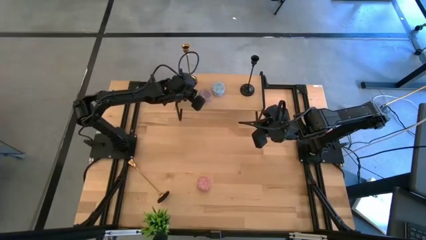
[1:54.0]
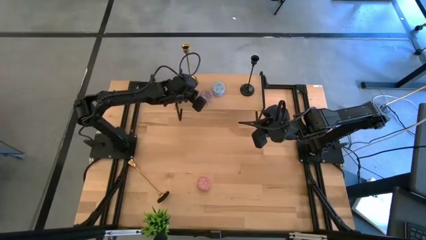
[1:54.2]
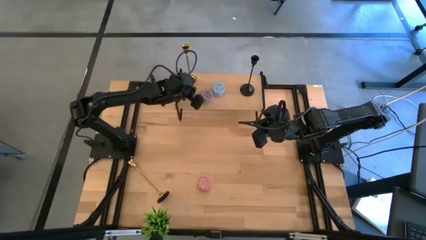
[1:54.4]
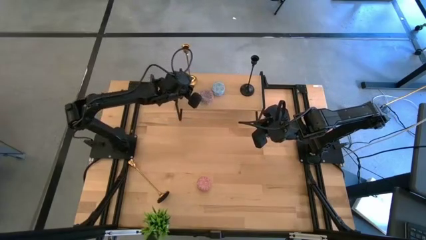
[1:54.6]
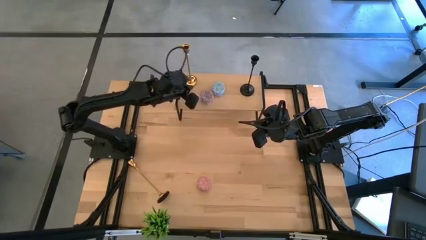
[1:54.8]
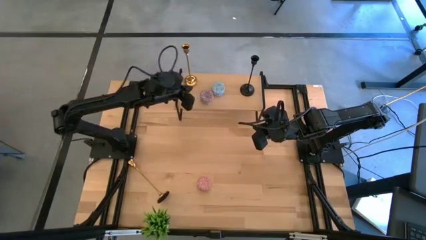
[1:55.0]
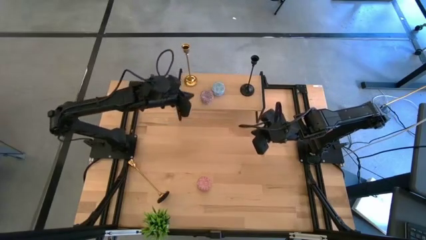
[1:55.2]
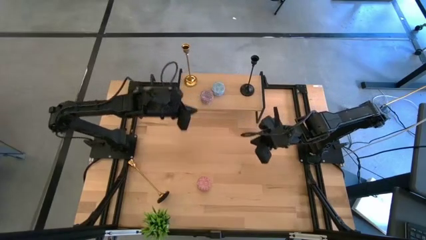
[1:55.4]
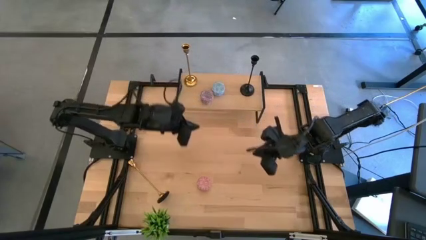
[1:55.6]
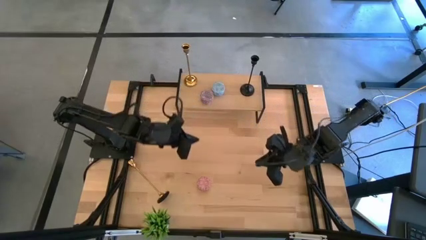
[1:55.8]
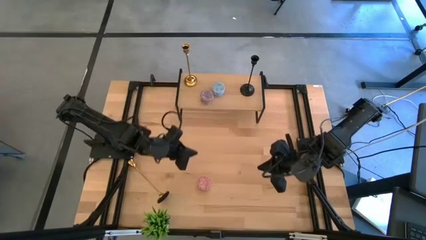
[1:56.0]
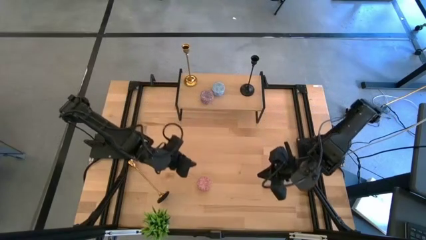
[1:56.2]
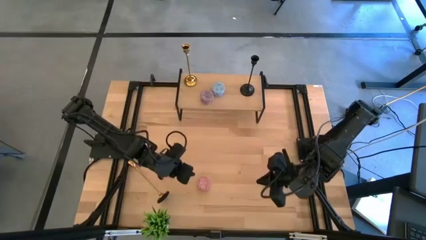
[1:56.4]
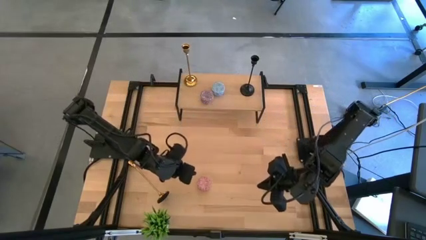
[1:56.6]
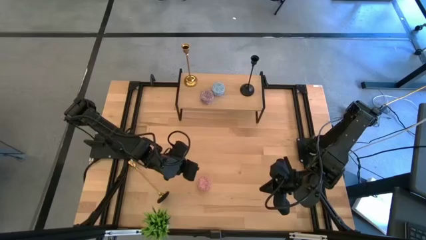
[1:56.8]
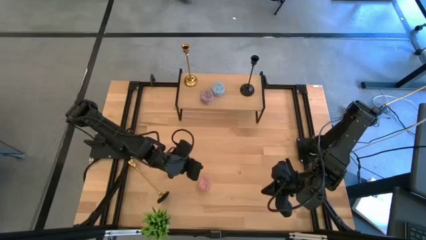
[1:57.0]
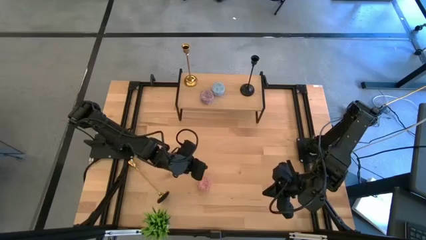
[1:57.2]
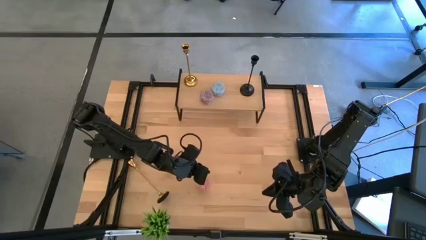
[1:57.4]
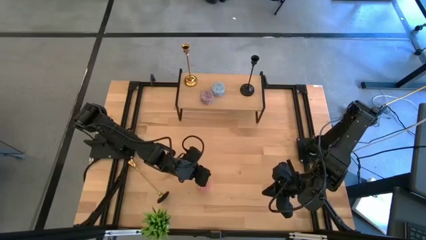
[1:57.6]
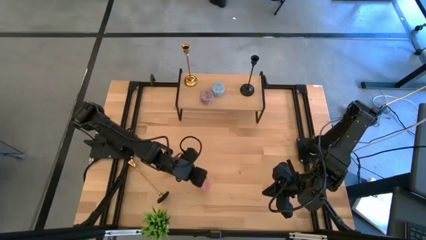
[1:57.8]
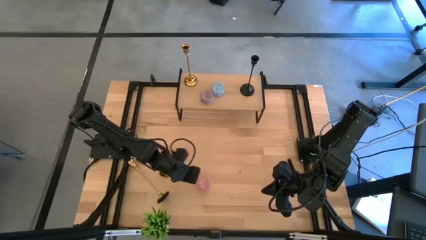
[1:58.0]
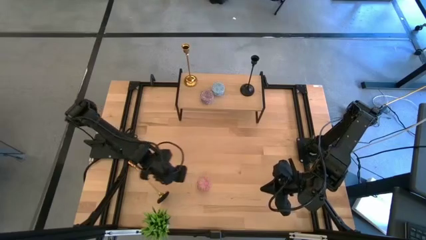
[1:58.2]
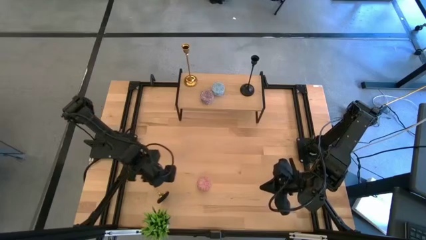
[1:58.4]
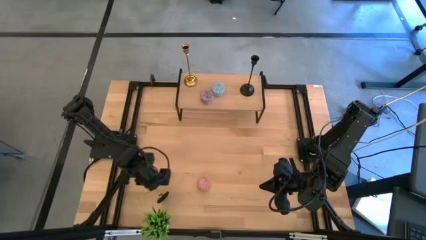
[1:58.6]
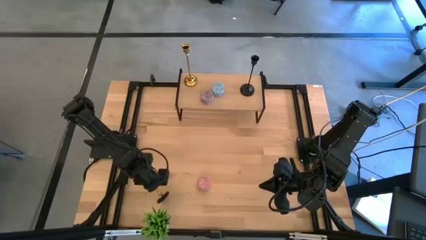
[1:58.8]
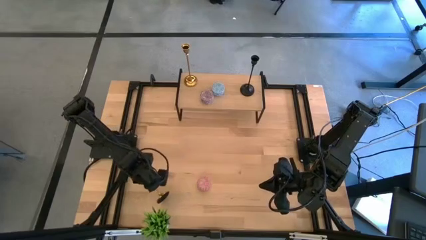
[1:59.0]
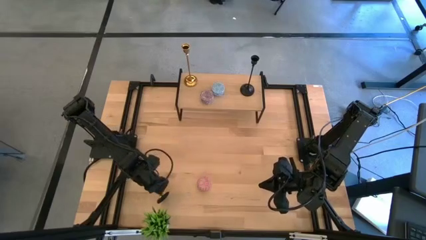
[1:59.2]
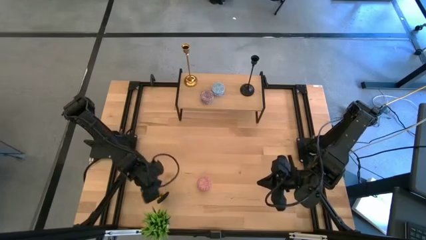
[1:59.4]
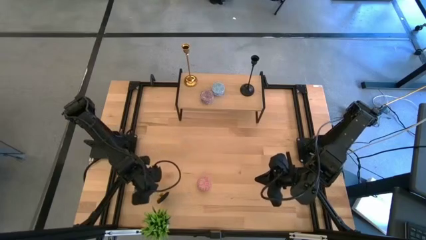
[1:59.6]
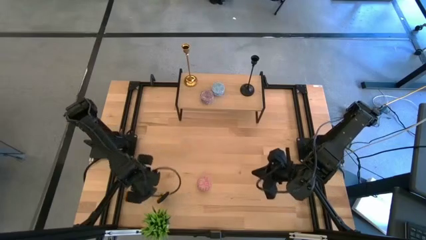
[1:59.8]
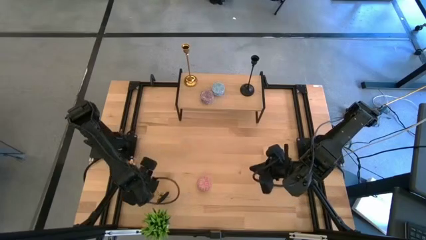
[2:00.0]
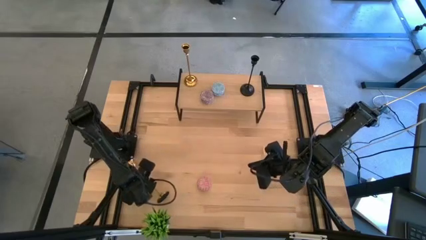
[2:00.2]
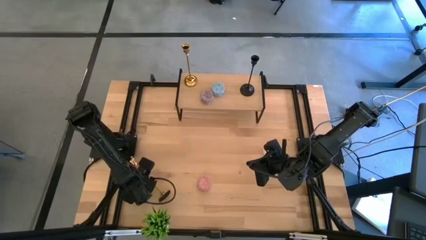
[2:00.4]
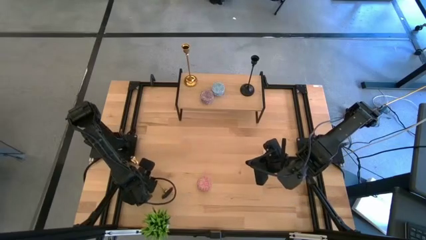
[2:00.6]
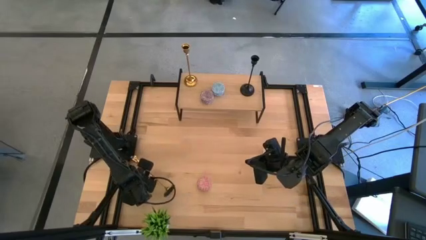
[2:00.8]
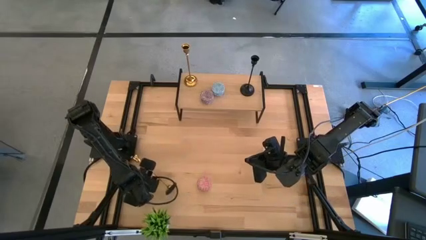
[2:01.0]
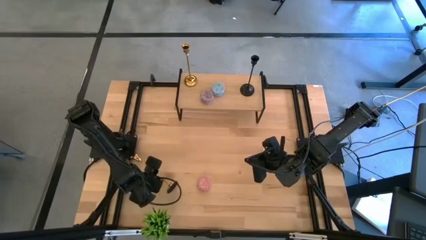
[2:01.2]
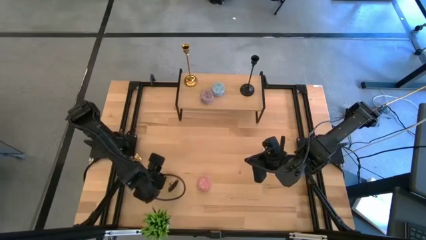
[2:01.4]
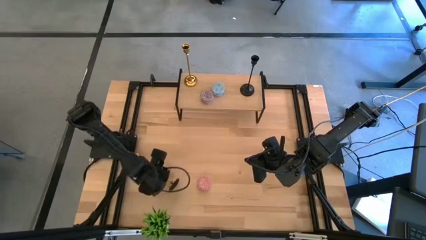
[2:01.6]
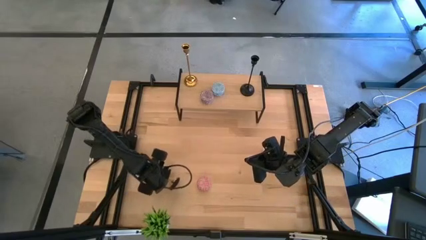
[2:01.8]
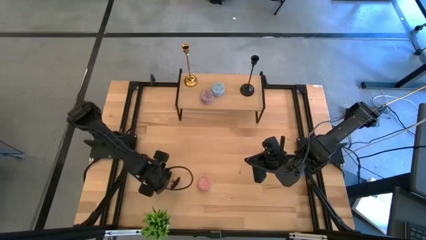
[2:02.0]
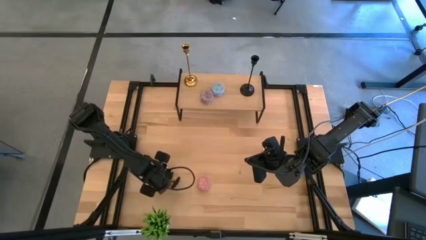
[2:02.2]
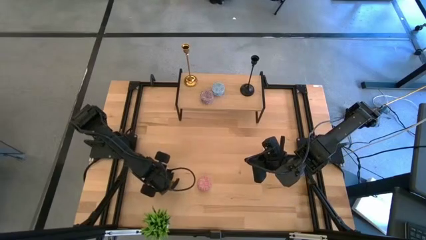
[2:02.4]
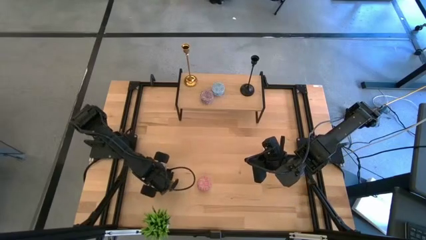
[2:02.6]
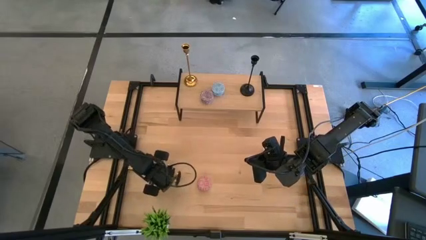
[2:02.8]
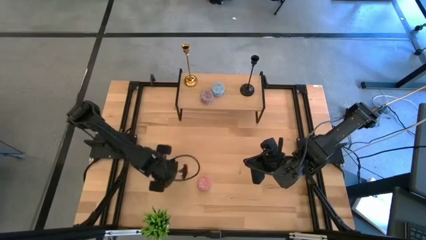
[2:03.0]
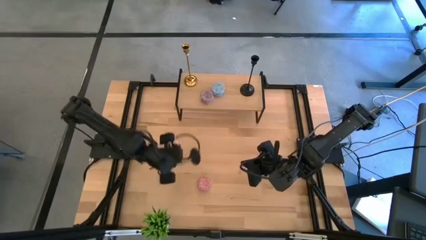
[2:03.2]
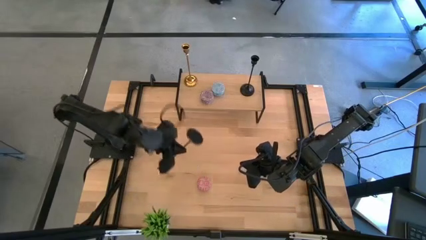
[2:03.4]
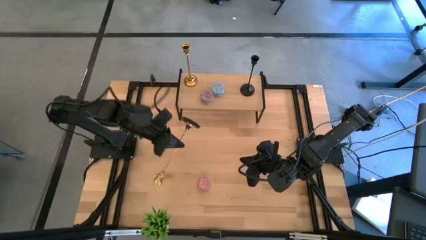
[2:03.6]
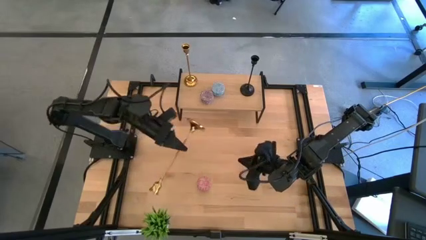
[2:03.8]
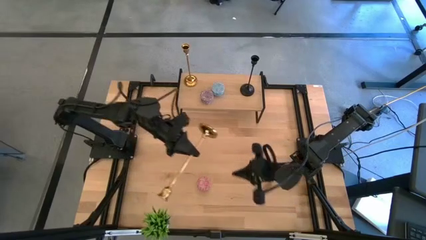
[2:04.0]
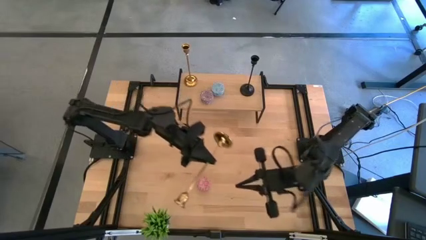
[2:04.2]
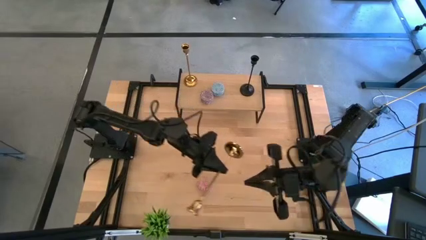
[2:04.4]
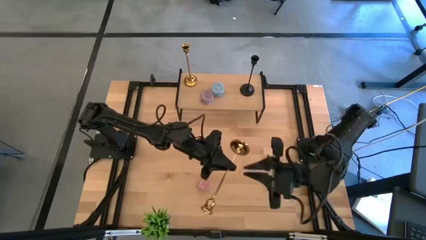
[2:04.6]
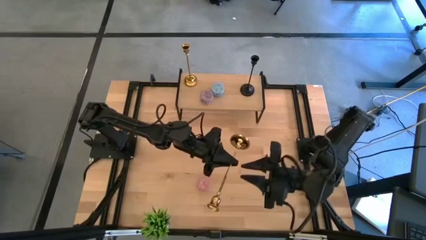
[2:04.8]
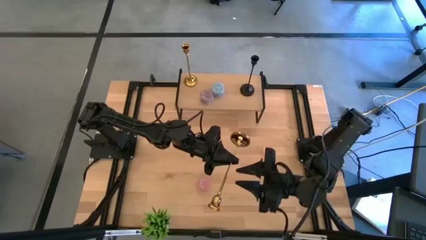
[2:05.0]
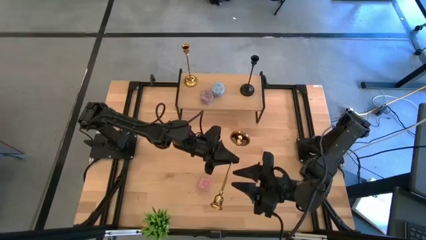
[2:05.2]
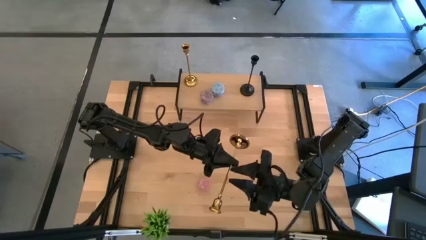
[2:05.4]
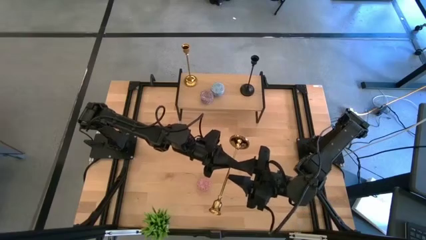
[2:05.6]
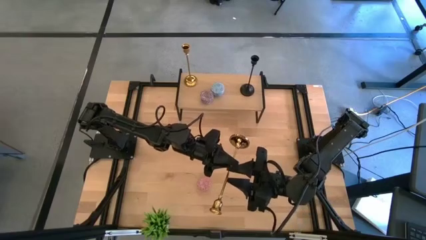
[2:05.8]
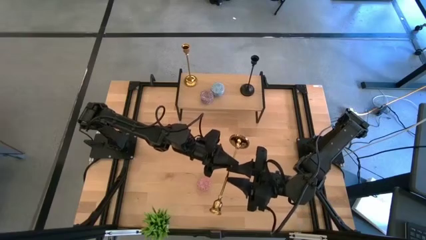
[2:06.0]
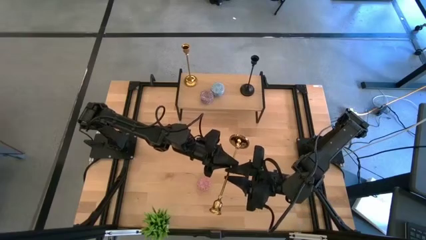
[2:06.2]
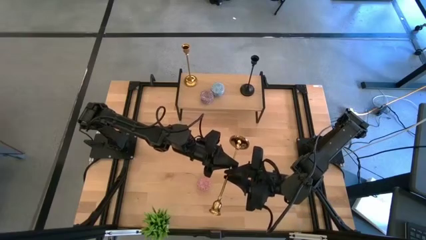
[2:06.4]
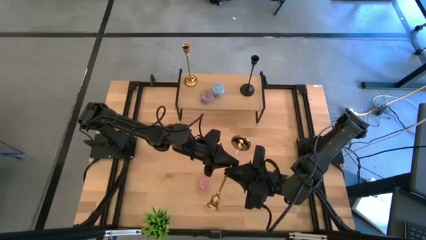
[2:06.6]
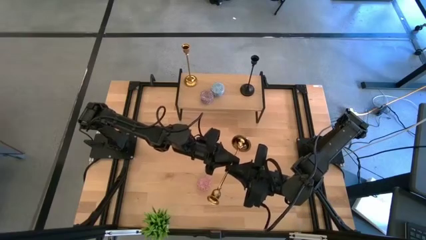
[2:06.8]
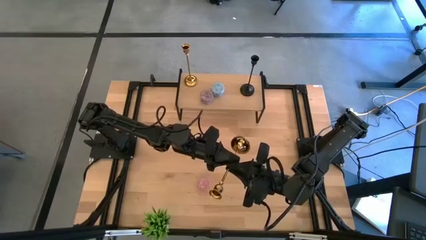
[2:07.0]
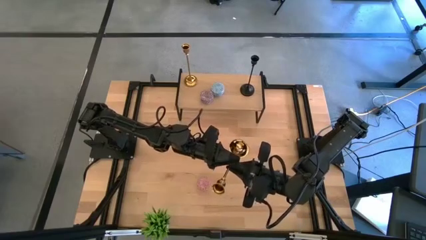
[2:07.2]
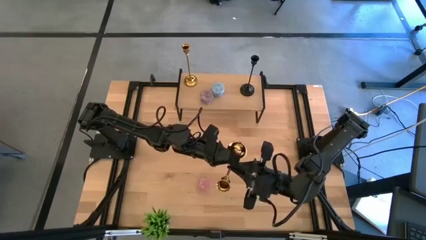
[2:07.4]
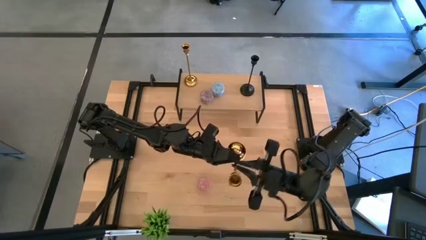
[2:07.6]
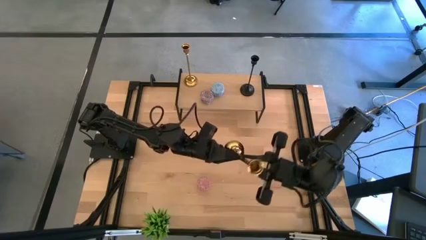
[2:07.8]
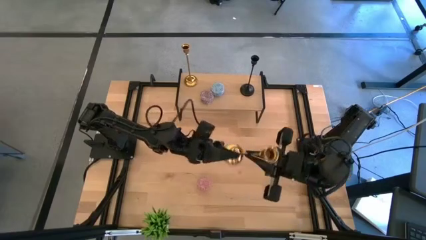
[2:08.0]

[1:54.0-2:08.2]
Task: Pick & Place candle stick holders
Put the gold candle holder on the shelf

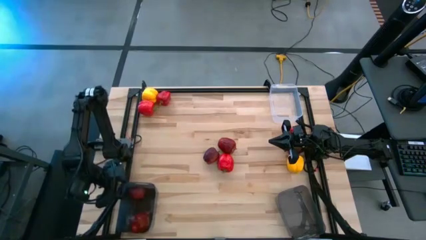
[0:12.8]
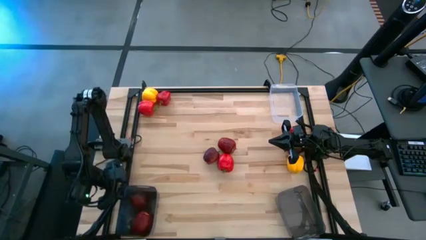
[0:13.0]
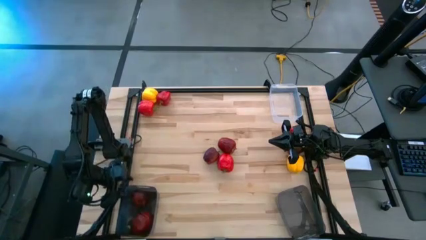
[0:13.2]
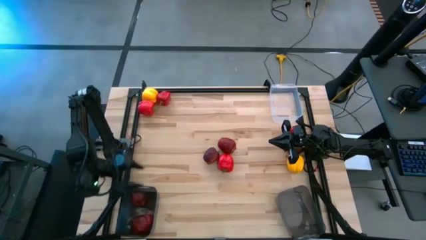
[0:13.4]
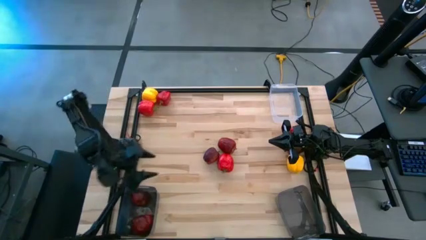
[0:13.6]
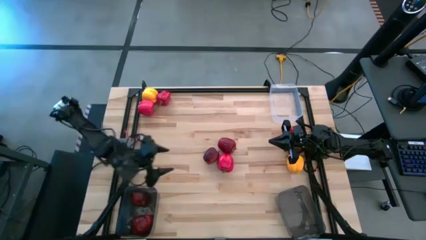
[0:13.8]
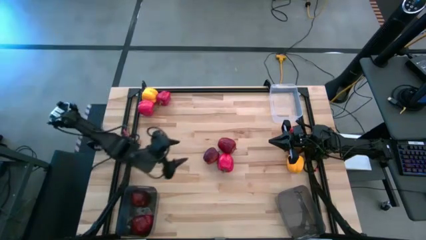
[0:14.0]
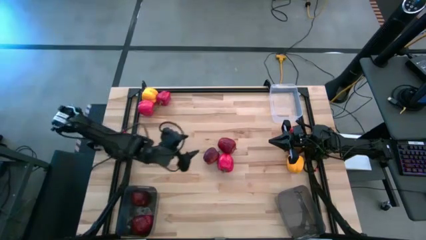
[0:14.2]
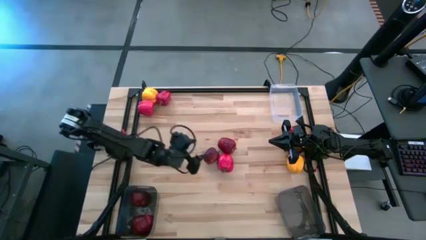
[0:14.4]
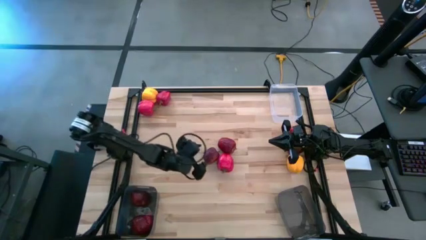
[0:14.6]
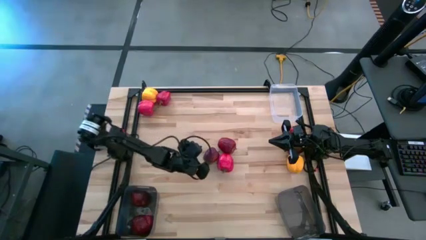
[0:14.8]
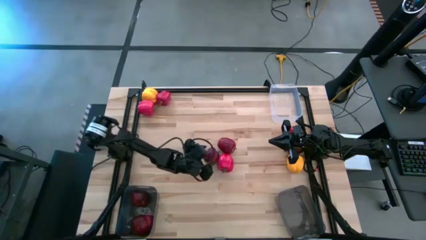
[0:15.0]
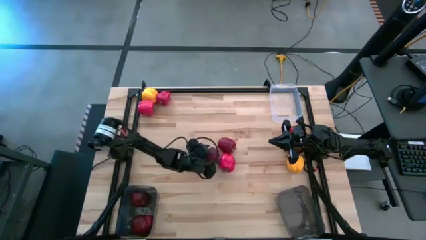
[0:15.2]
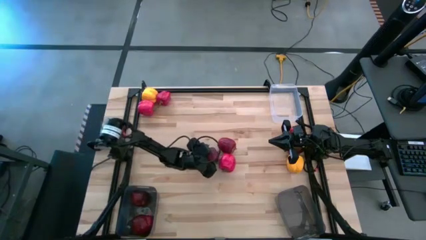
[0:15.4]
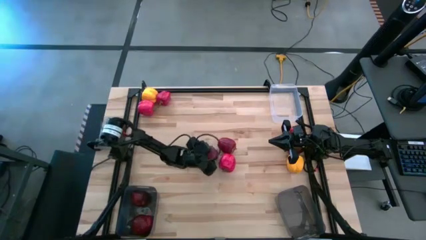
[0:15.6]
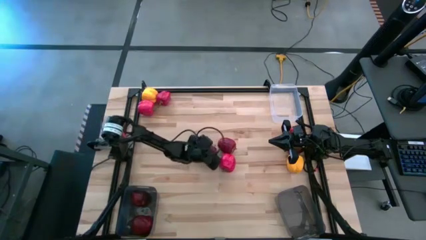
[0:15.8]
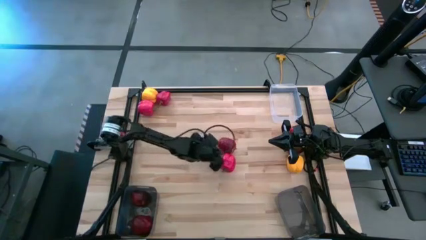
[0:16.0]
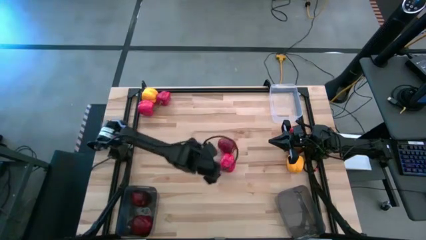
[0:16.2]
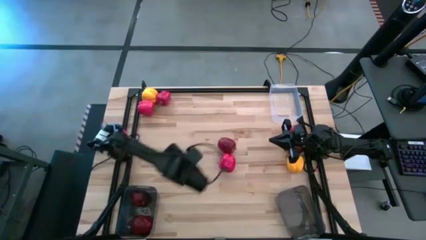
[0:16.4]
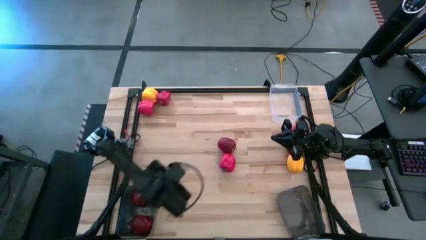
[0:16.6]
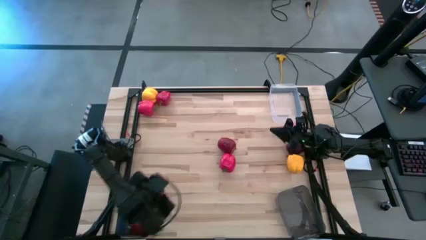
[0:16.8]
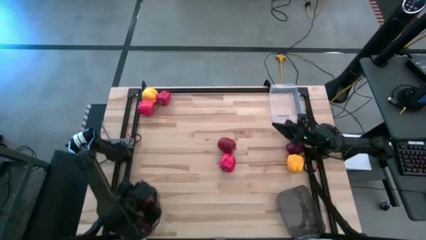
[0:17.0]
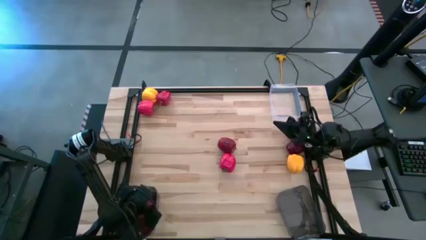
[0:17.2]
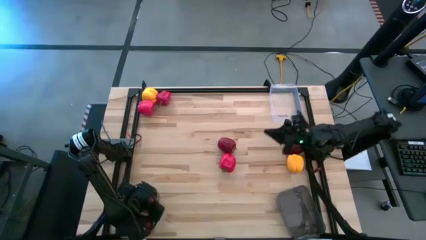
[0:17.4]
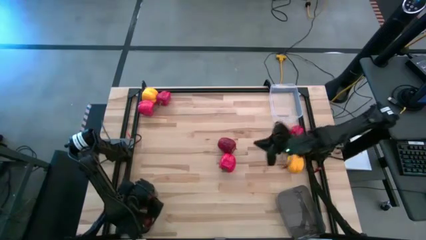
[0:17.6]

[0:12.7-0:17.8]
Task: Sort produce into baskets
Put the dark red apple into the left black bin
